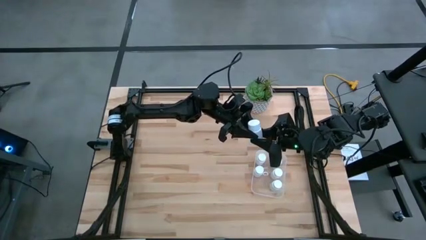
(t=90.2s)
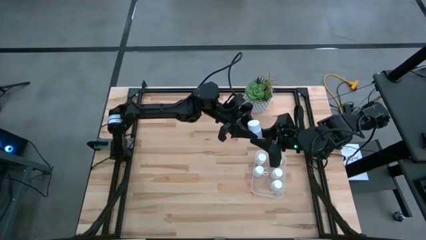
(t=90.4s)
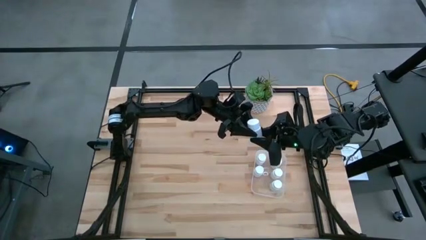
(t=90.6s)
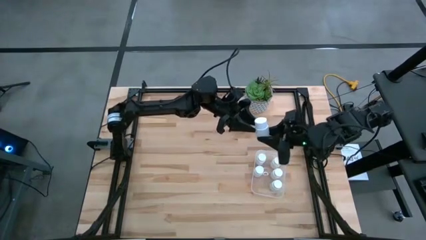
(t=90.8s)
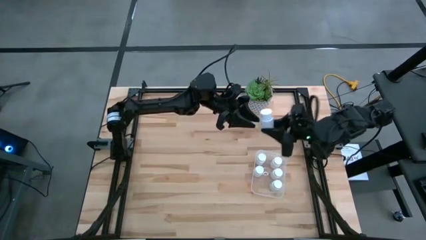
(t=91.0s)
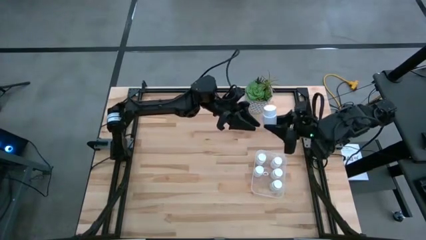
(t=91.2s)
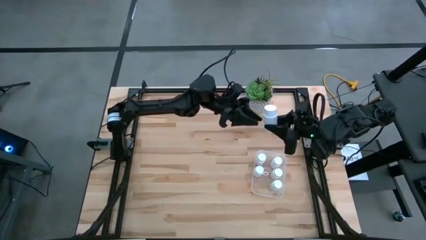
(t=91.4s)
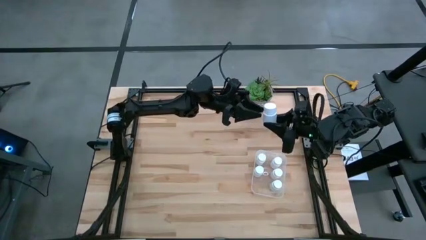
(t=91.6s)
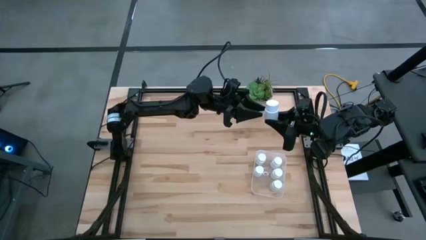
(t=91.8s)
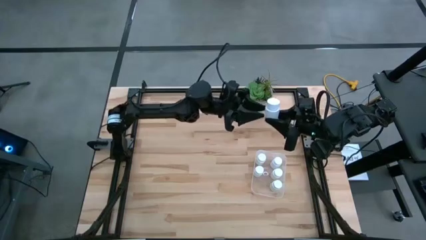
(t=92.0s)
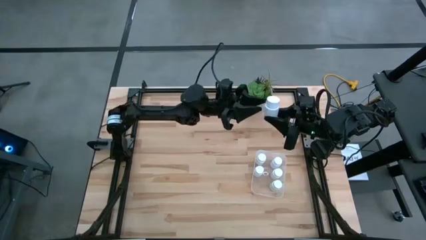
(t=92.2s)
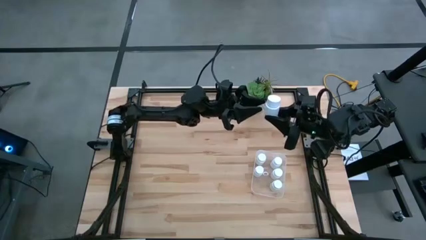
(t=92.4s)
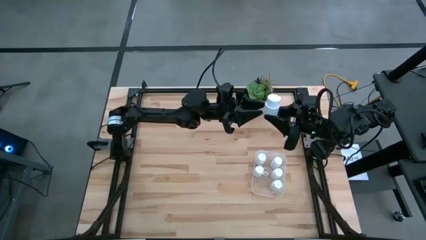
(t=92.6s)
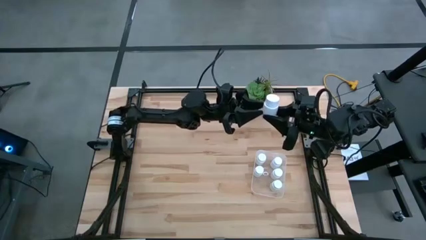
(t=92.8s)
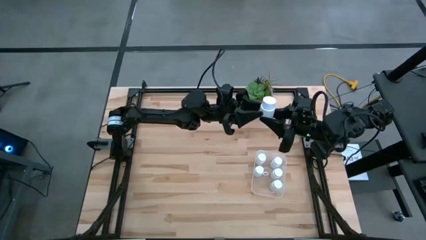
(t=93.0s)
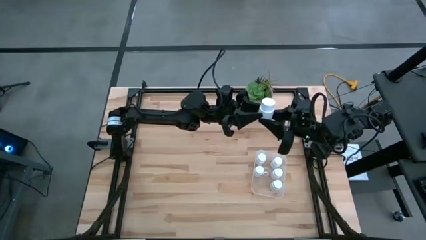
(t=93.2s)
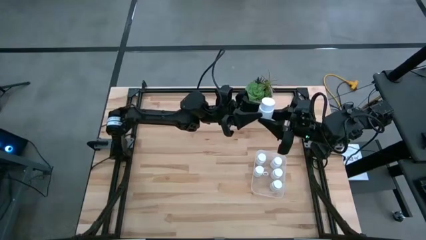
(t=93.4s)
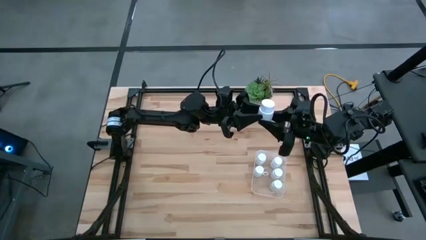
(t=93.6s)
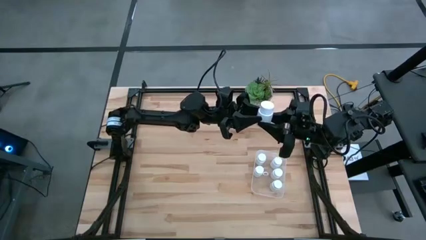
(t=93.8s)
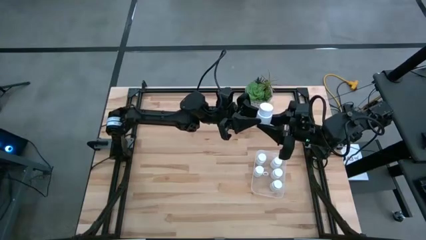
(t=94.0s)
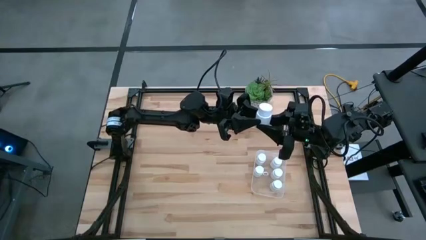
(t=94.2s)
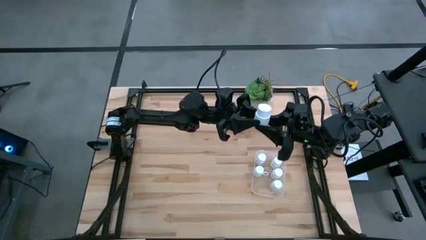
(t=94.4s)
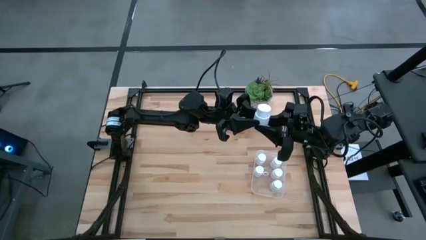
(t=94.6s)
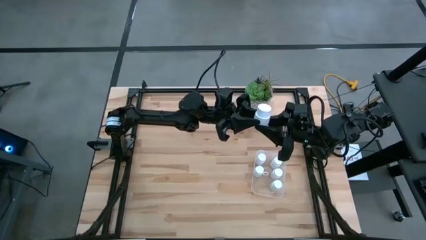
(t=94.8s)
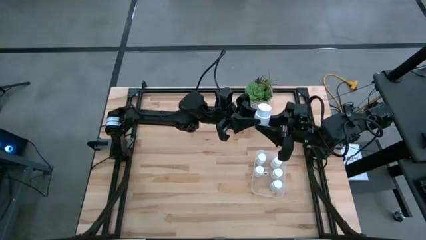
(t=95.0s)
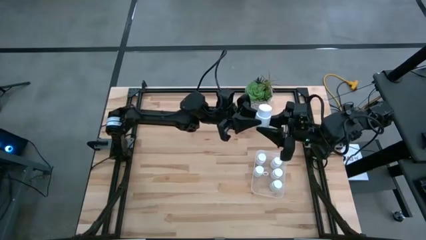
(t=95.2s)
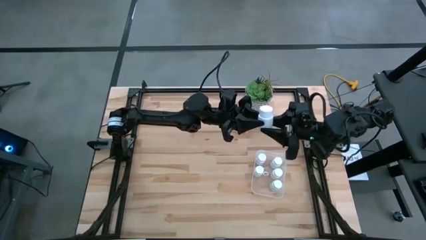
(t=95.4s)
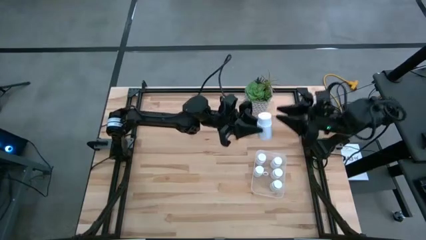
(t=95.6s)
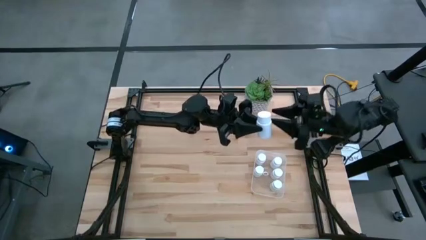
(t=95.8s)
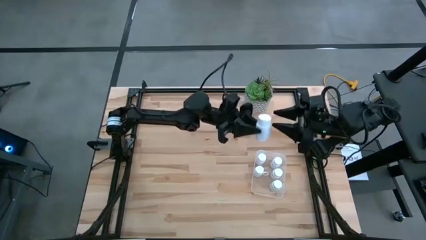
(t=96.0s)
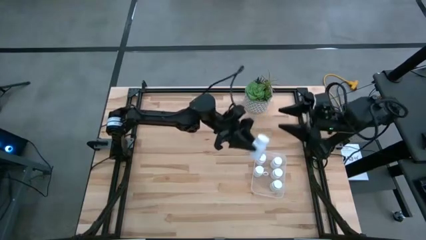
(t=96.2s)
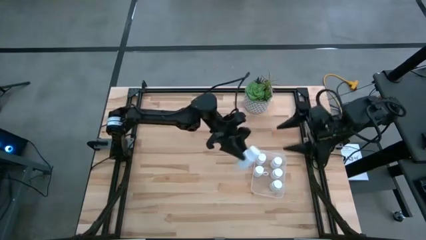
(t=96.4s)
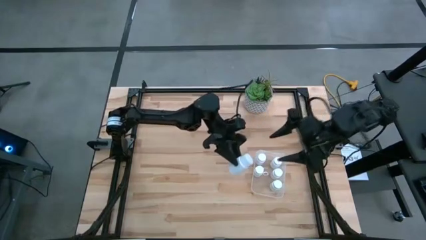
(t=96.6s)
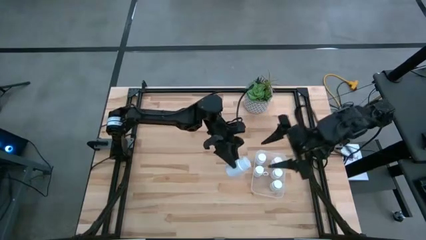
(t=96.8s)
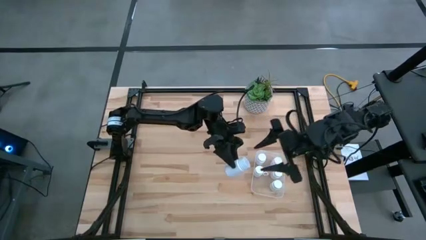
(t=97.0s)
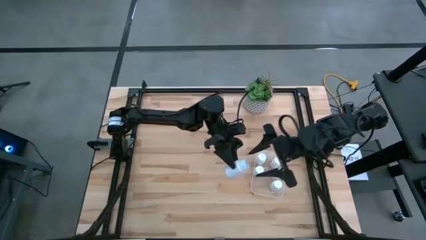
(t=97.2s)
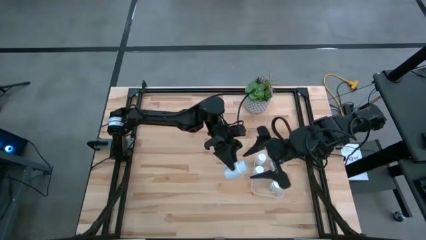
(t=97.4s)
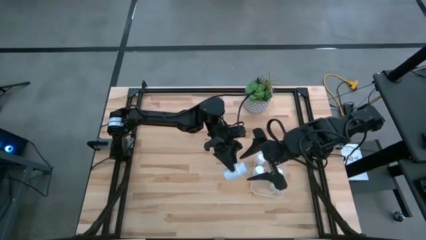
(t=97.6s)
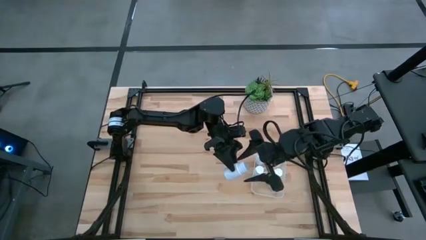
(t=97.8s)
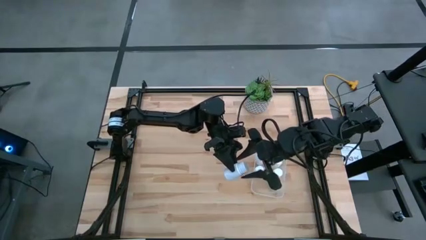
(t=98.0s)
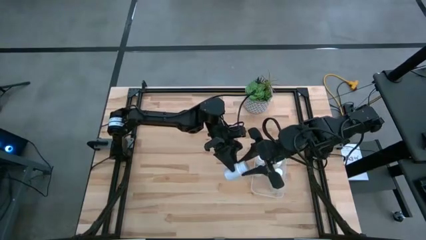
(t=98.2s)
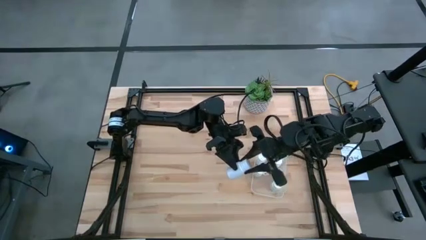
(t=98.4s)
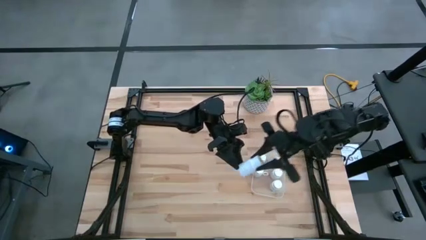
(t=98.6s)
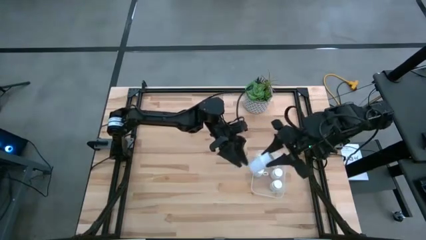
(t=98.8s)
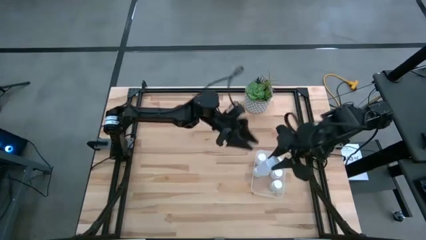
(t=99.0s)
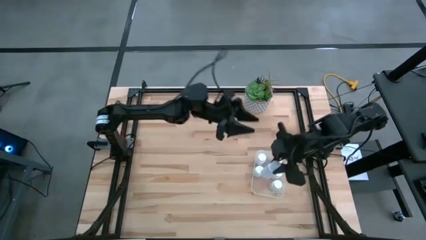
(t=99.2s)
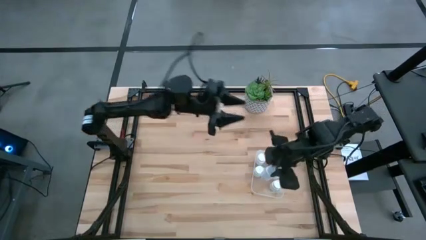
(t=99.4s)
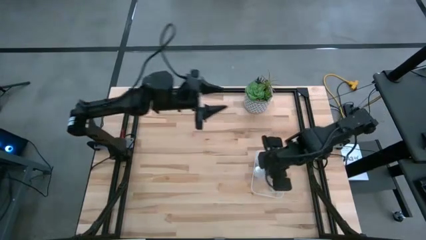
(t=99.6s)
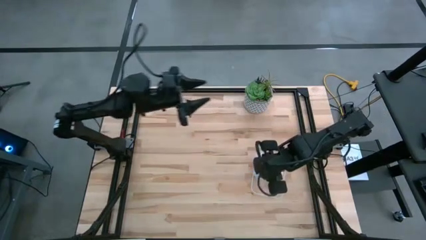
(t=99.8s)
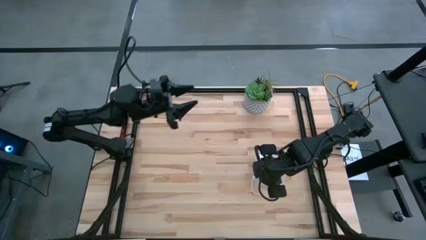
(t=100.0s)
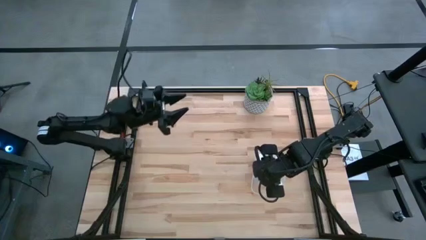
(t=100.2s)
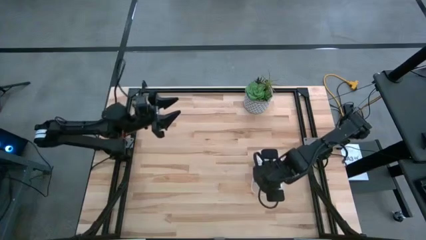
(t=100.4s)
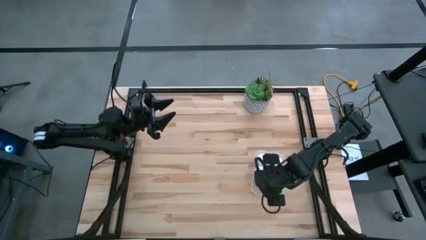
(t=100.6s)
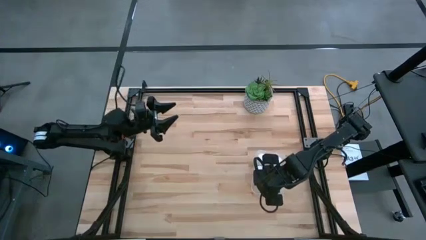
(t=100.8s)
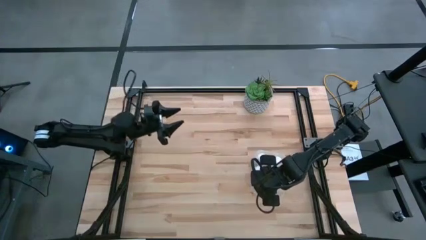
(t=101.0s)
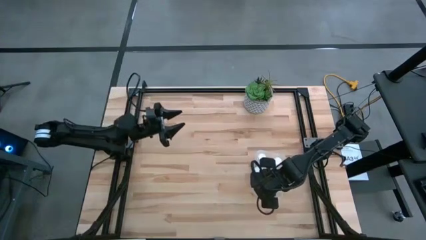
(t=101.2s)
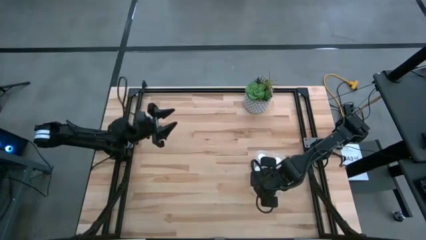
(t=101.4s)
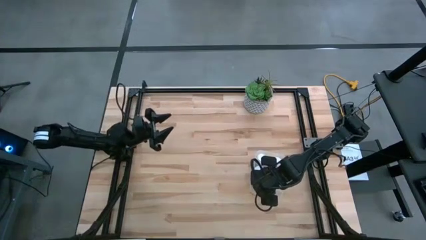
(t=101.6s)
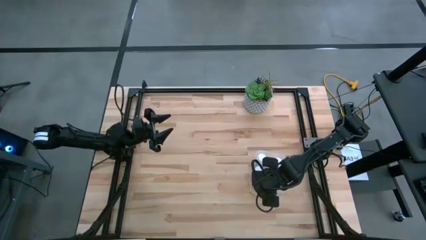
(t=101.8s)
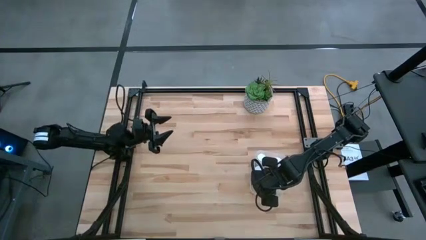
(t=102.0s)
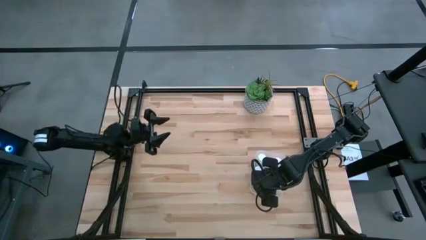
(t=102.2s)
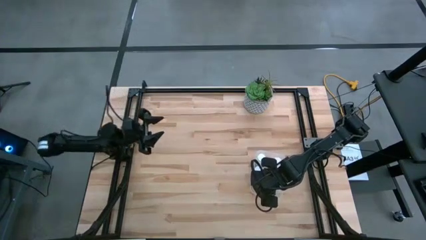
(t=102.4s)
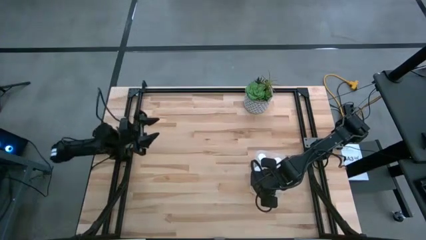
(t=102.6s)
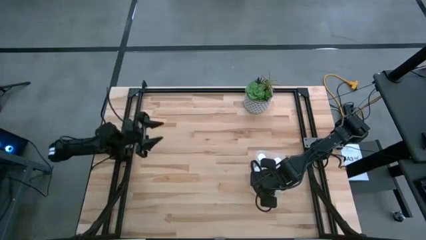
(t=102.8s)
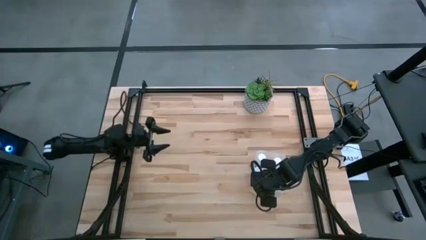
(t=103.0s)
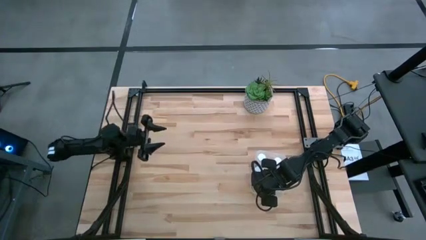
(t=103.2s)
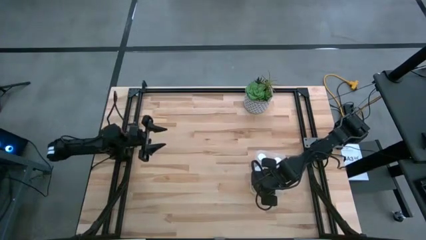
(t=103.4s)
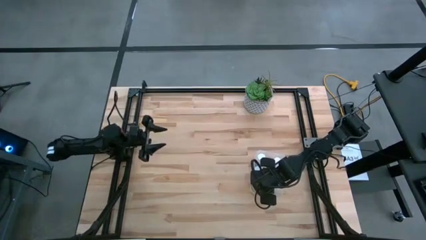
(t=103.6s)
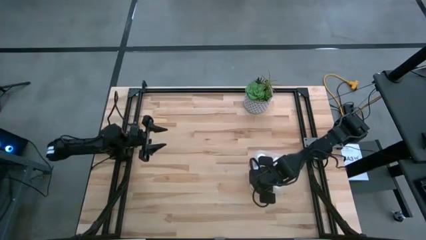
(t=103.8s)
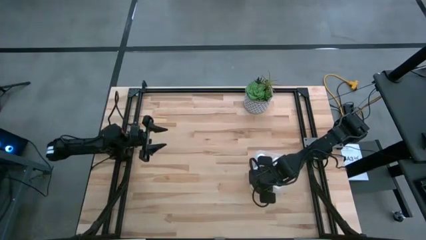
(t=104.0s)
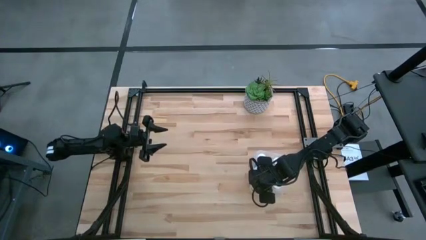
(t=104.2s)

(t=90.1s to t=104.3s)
Task: Pick and place pill bottles into a basket
Put the white medicine bottle into the transparent bin
